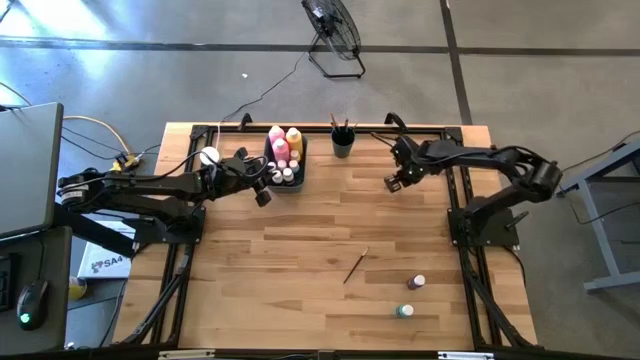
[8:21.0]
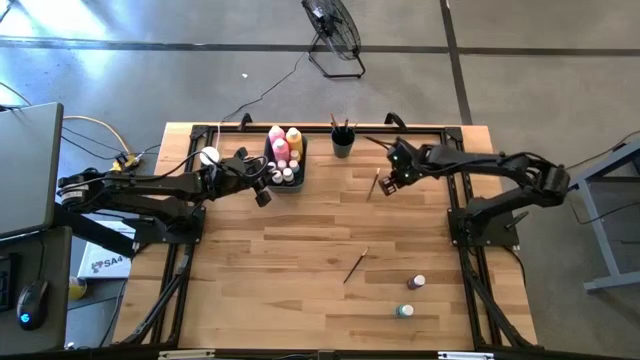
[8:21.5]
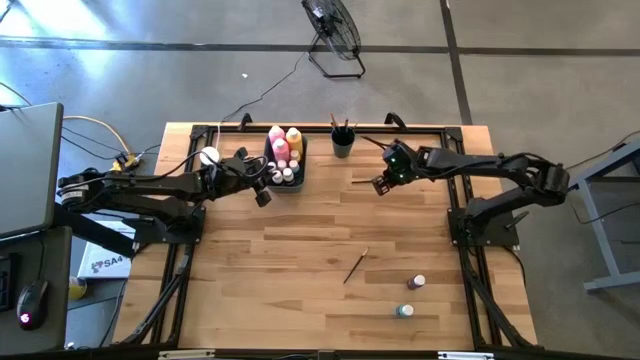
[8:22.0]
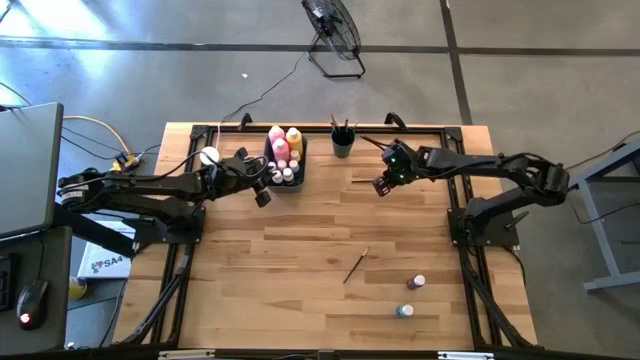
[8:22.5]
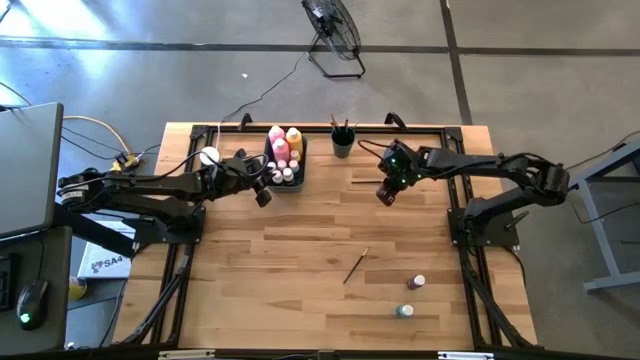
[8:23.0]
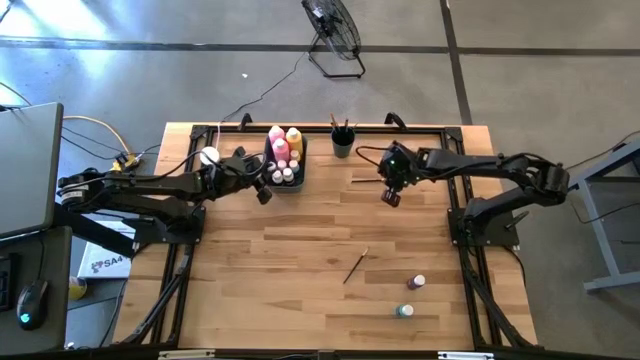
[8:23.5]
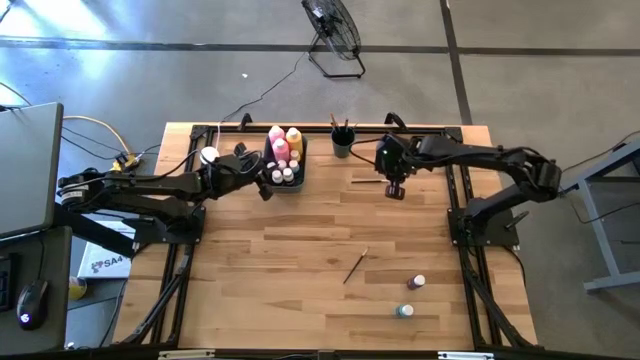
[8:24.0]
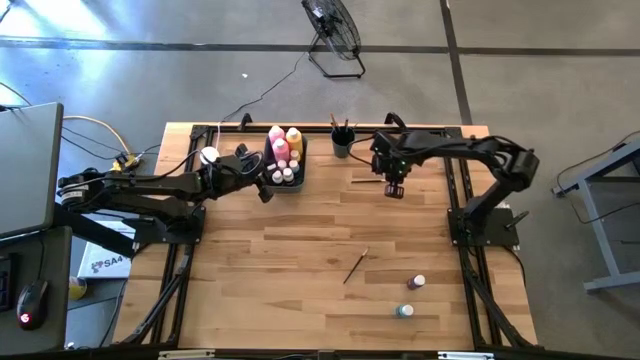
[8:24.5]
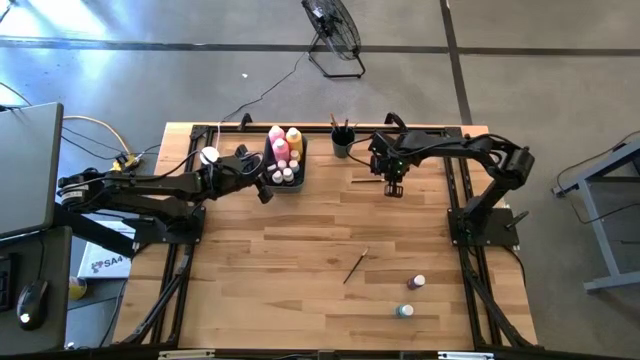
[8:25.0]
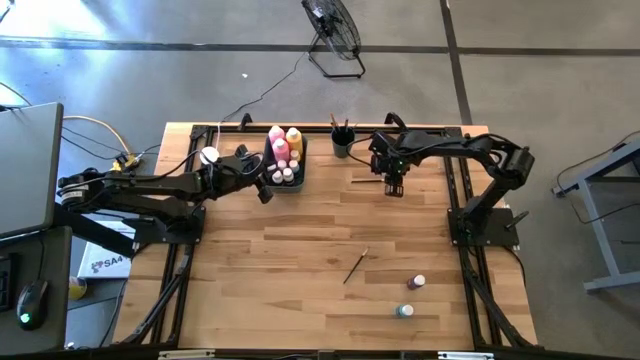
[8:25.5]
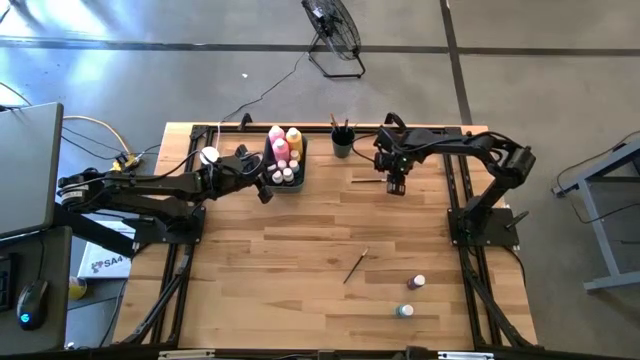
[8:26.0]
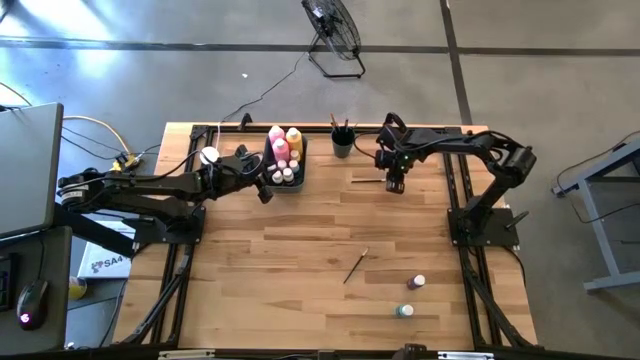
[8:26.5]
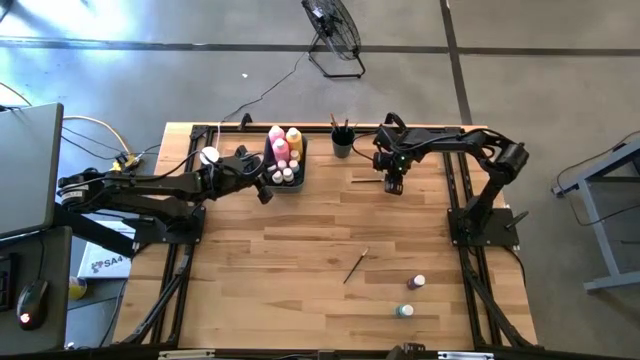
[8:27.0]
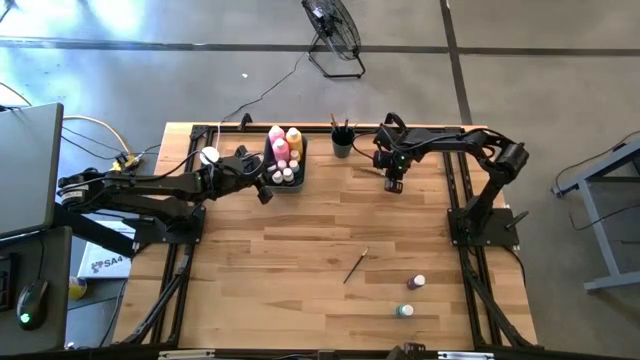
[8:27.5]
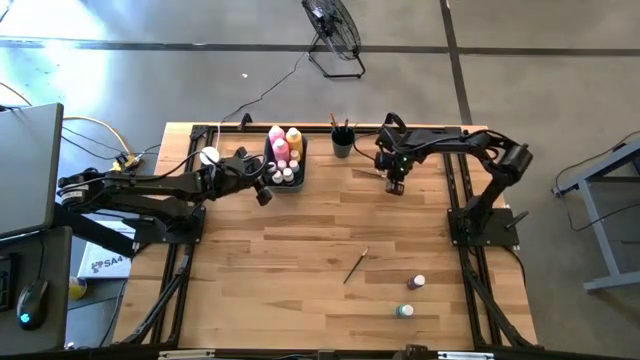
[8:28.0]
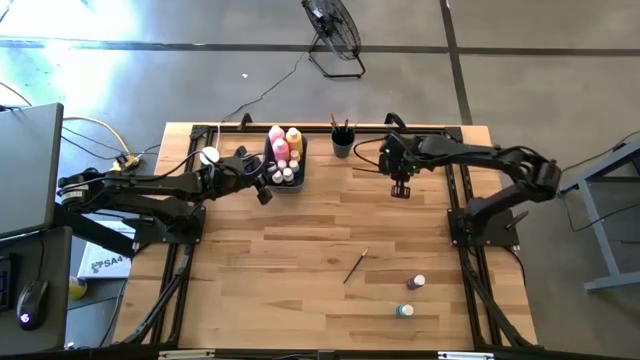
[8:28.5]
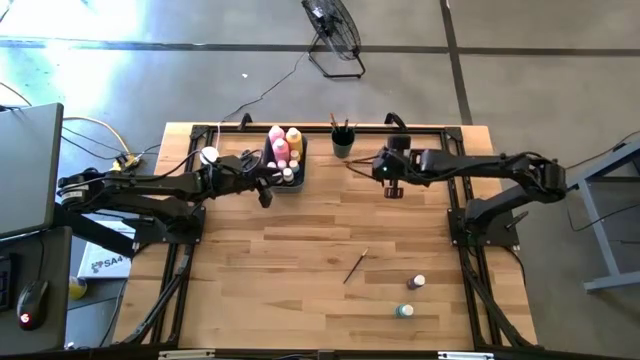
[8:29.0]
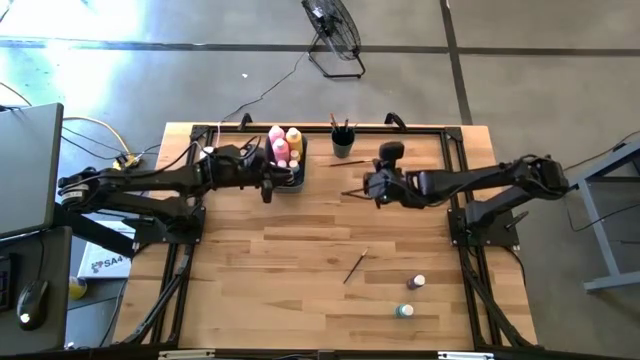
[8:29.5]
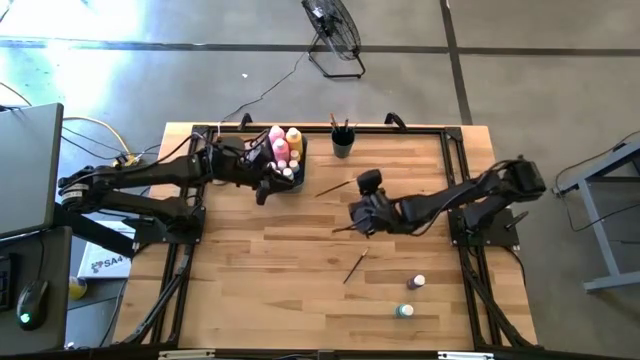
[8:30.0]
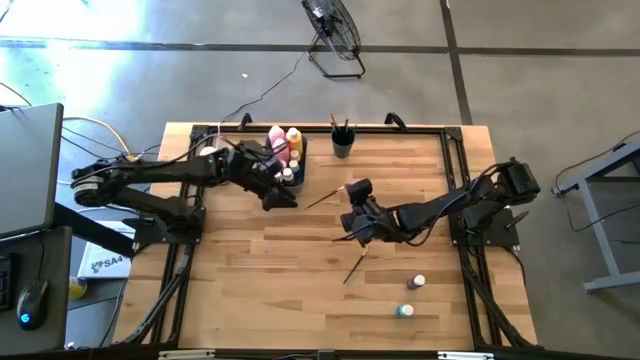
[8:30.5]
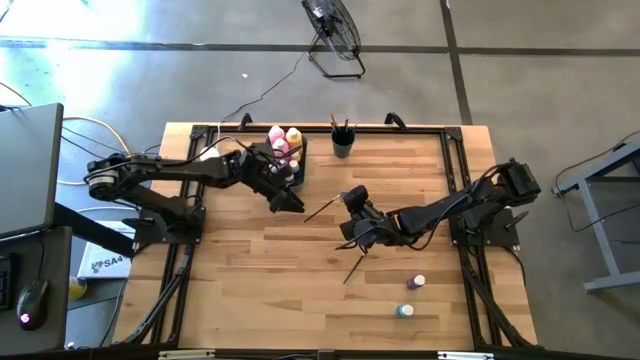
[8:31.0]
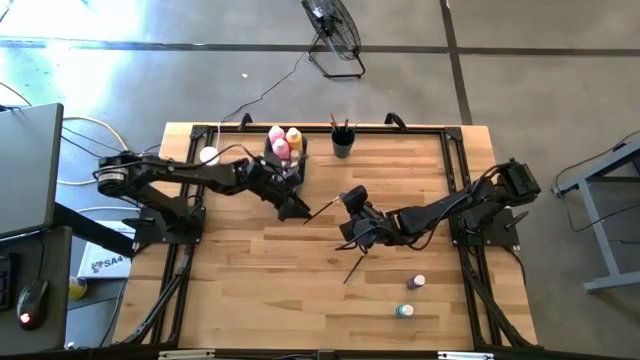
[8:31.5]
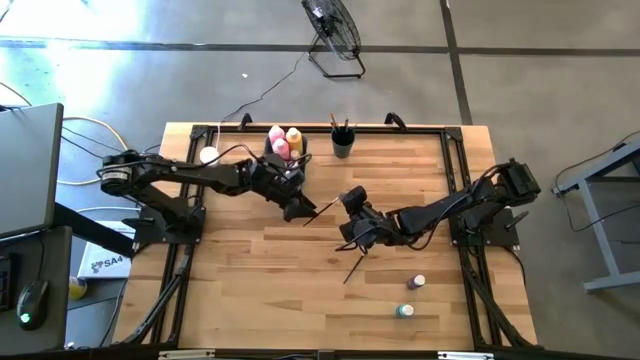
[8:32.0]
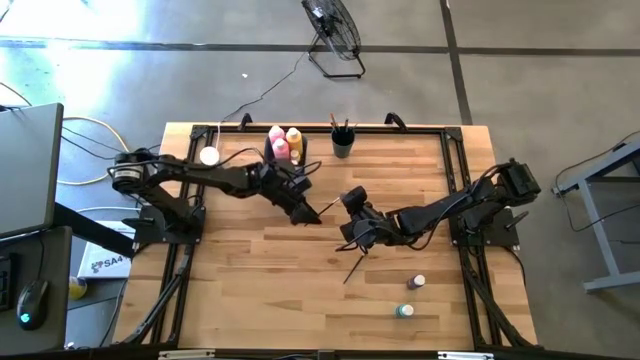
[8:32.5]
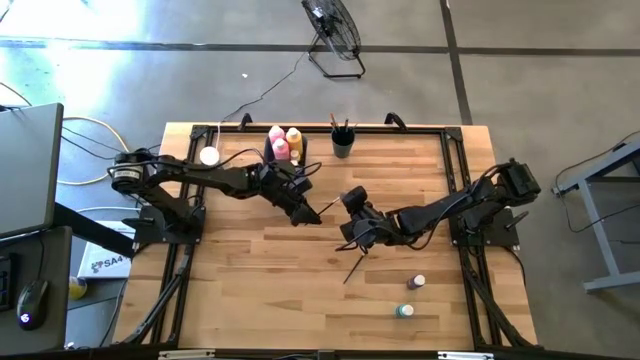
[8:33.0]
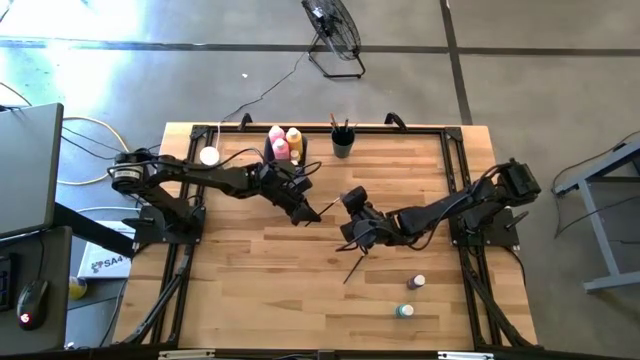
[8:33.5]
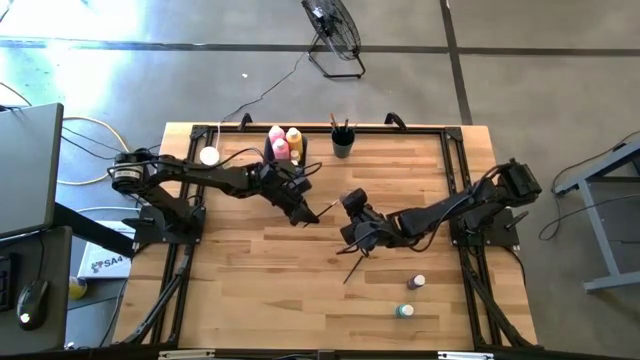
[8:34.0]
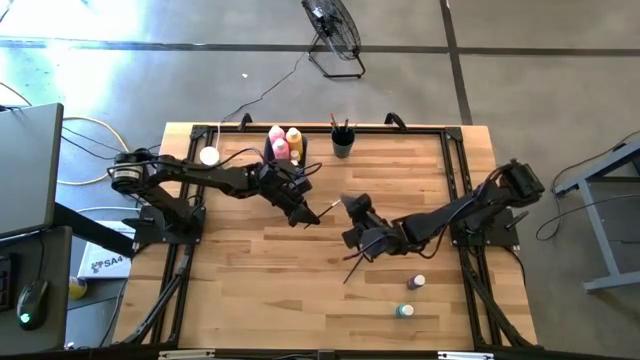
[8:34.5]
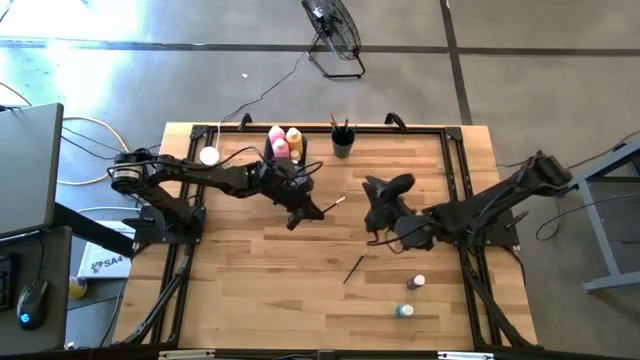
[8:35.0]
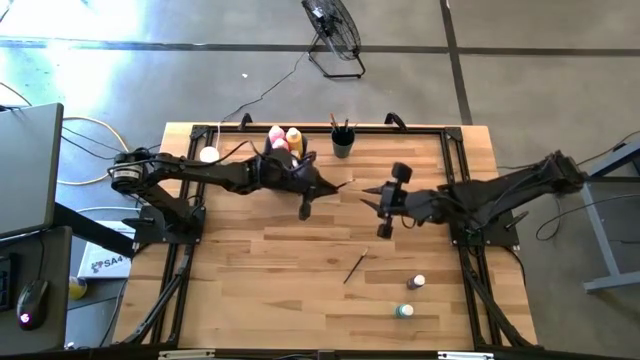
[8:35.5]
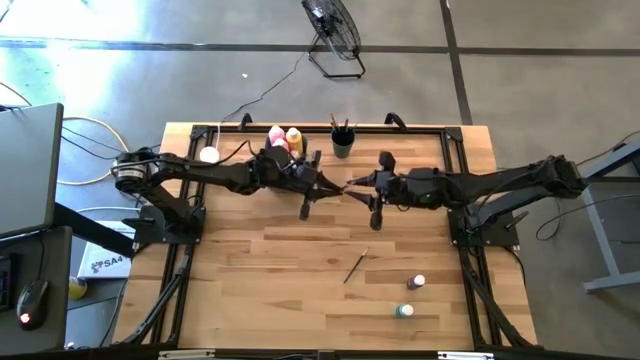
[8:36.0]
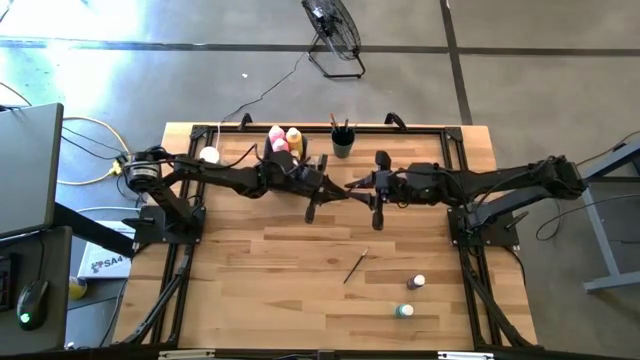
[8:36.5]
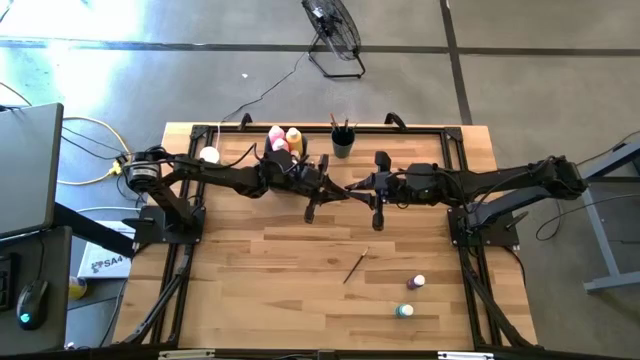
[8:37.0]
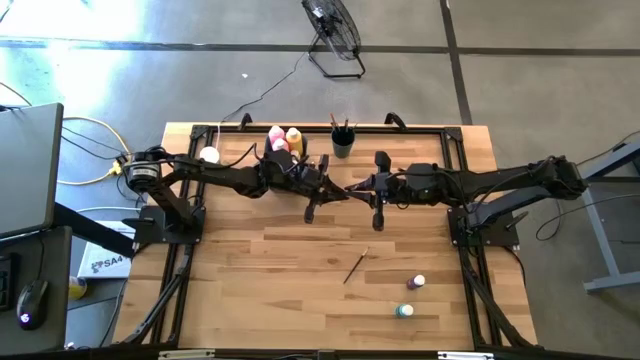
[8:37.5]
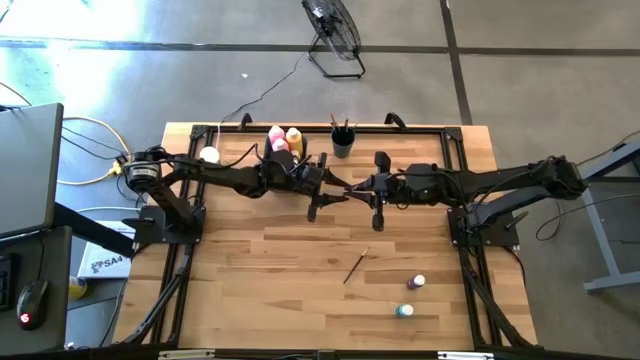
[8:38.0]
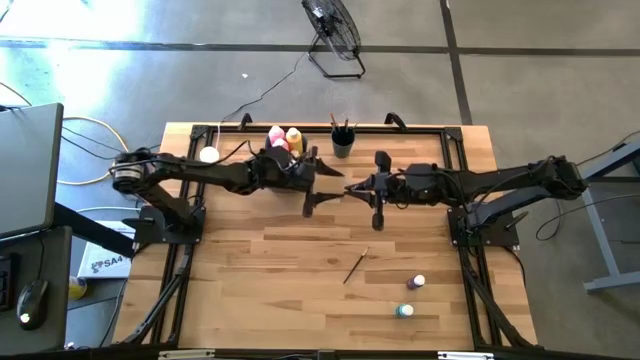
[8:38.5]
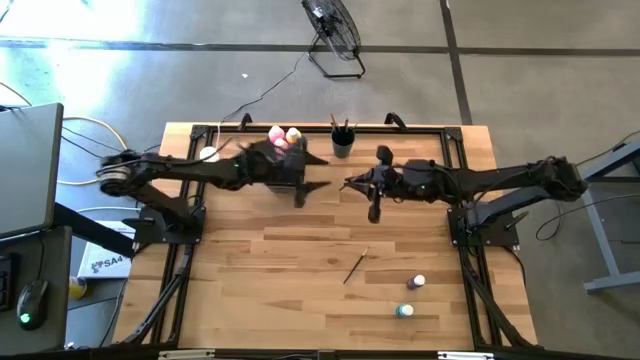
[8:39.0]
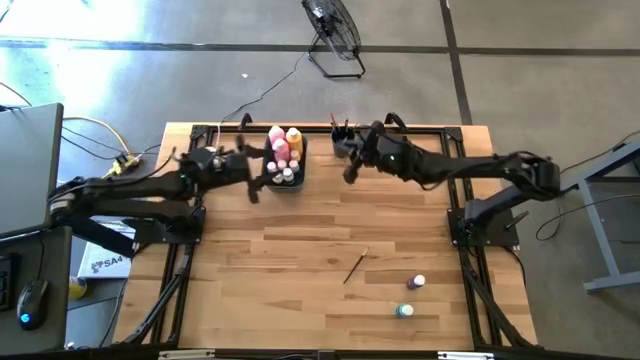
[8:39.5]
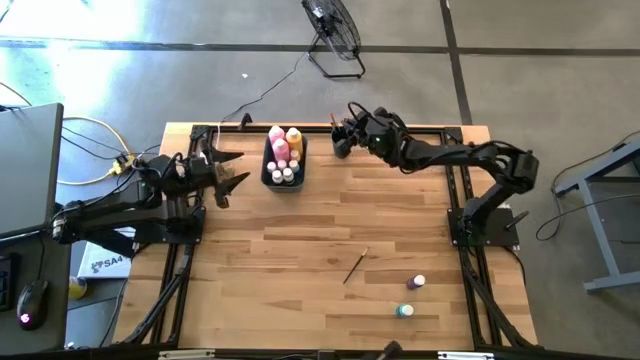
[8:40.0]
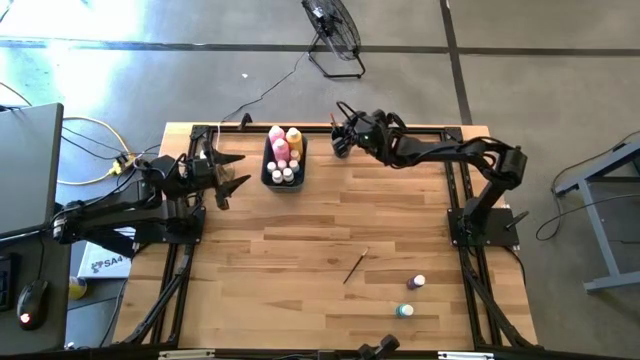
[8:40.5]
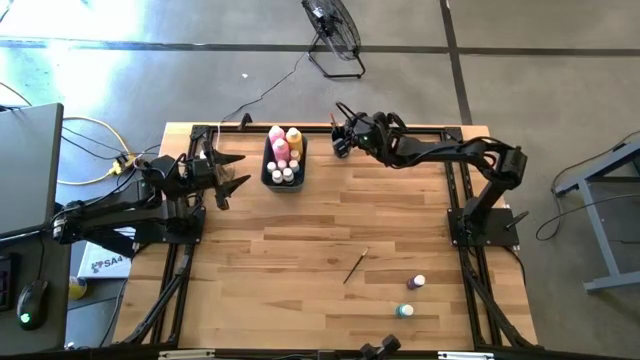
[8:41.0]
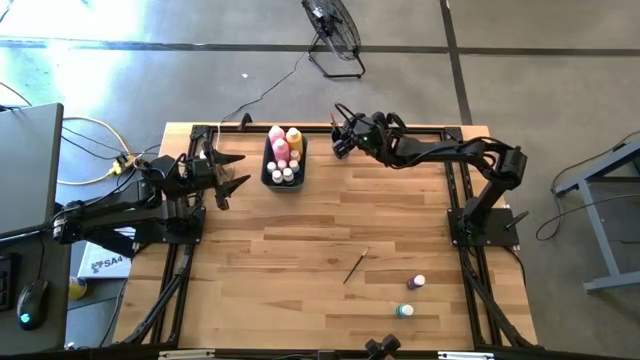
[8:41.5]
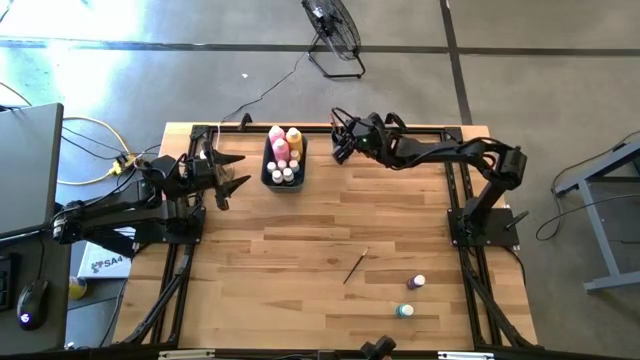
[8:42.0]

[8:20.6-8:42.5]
Task: Pick & Place Paint Supplies
Put the silver paint brush into the green cup
